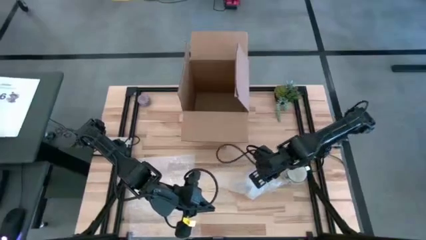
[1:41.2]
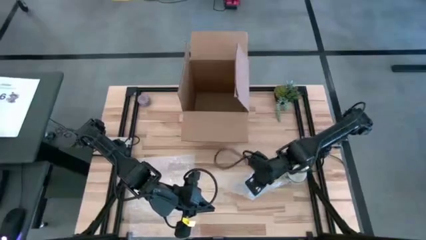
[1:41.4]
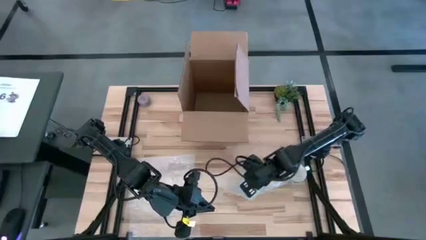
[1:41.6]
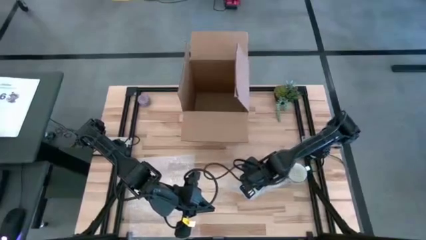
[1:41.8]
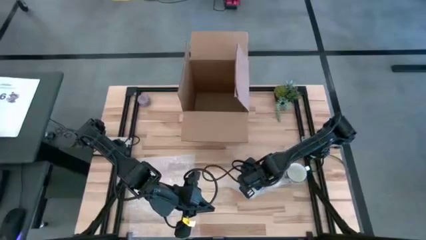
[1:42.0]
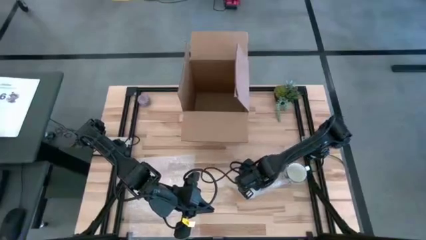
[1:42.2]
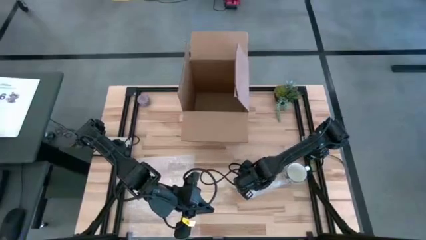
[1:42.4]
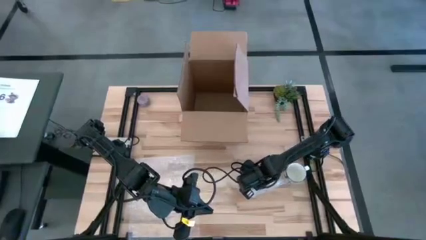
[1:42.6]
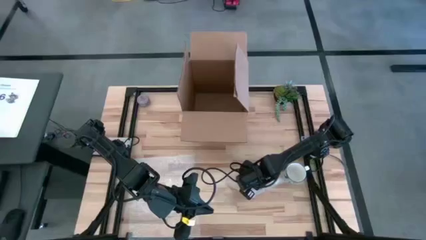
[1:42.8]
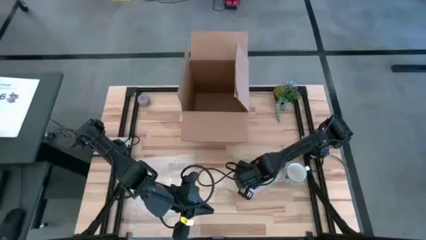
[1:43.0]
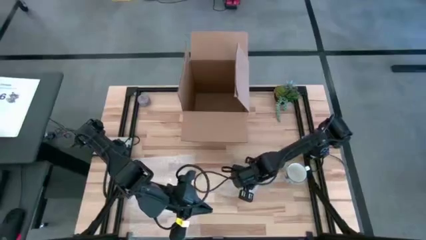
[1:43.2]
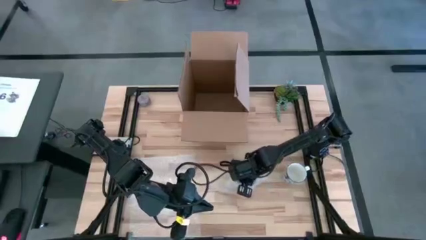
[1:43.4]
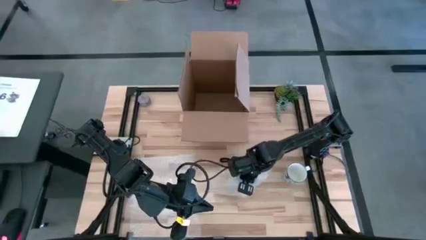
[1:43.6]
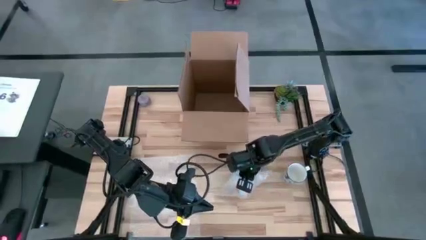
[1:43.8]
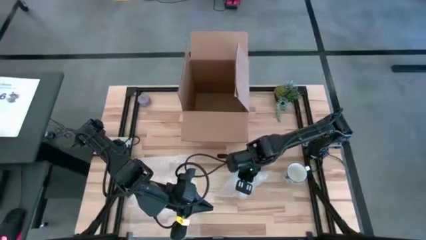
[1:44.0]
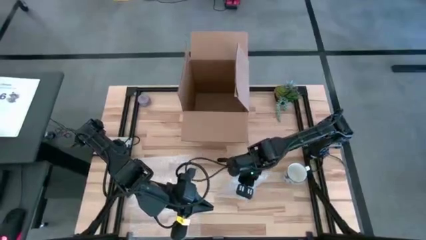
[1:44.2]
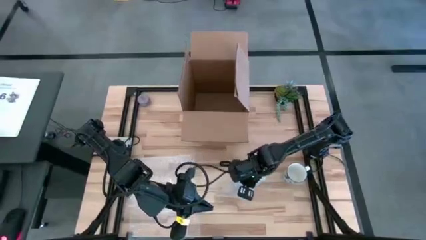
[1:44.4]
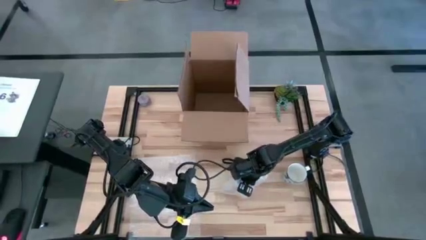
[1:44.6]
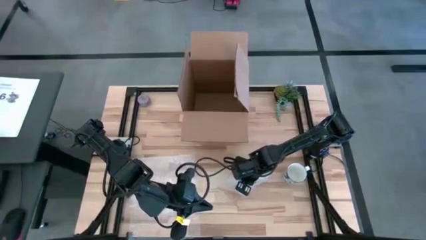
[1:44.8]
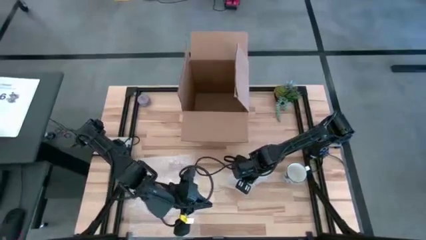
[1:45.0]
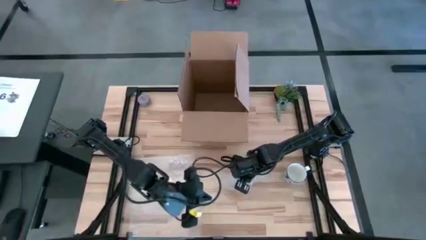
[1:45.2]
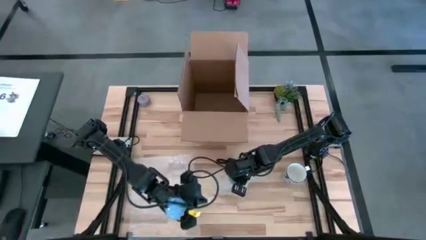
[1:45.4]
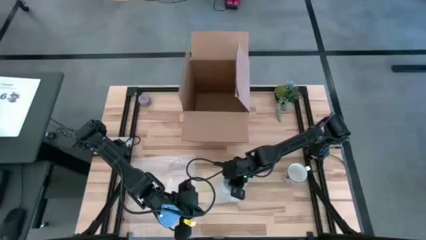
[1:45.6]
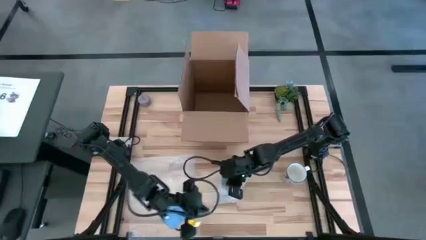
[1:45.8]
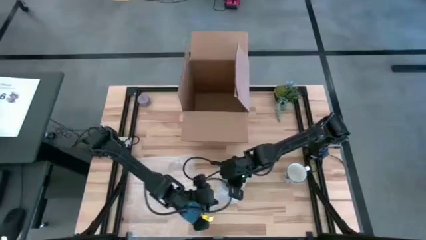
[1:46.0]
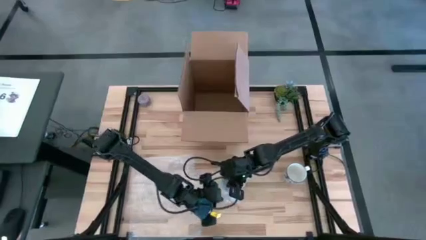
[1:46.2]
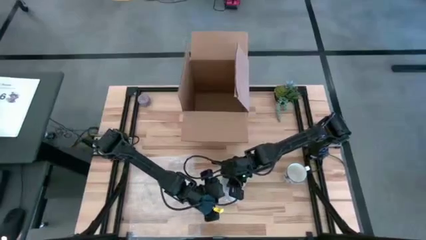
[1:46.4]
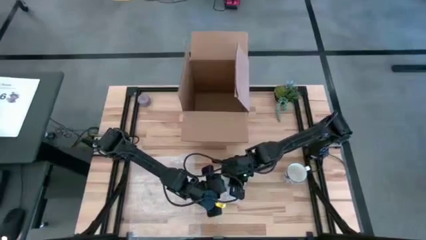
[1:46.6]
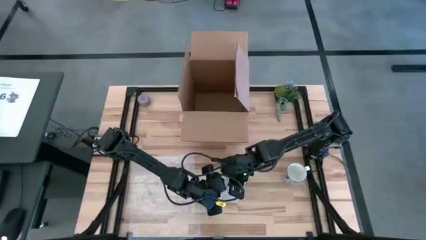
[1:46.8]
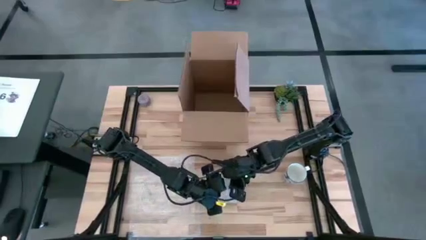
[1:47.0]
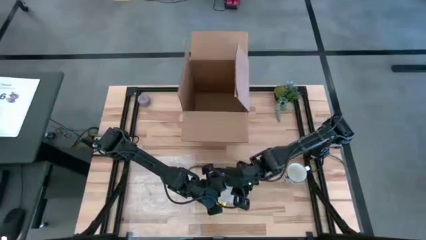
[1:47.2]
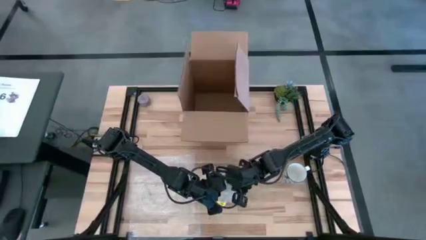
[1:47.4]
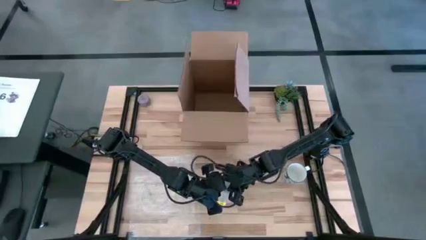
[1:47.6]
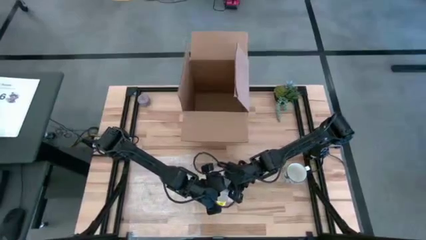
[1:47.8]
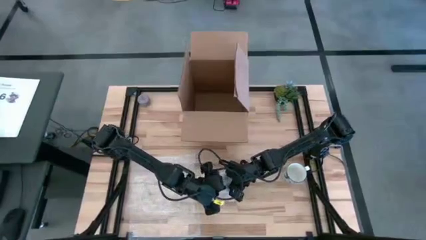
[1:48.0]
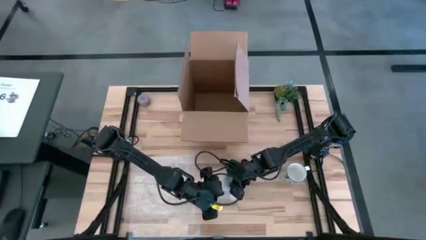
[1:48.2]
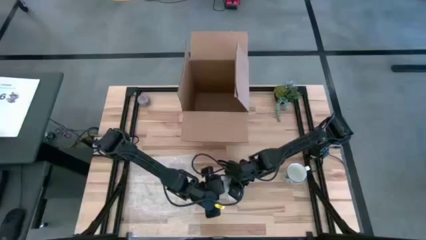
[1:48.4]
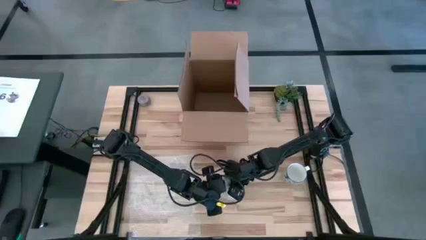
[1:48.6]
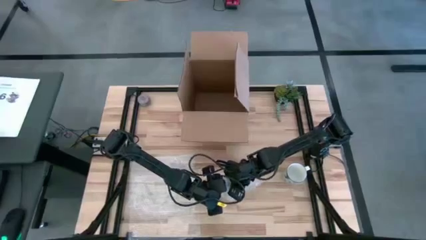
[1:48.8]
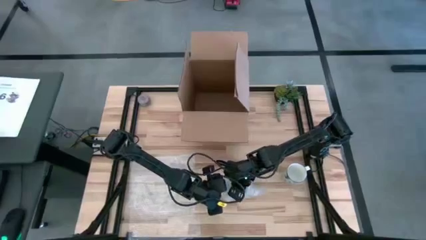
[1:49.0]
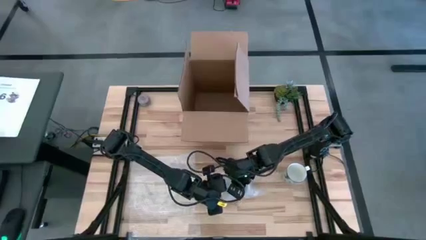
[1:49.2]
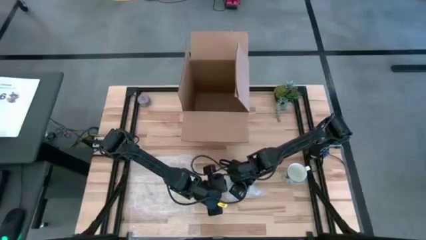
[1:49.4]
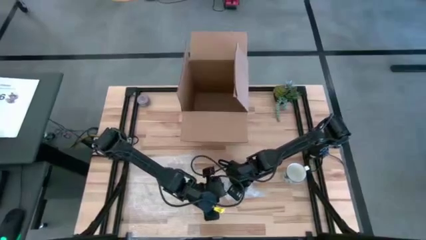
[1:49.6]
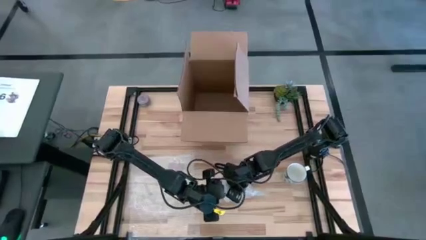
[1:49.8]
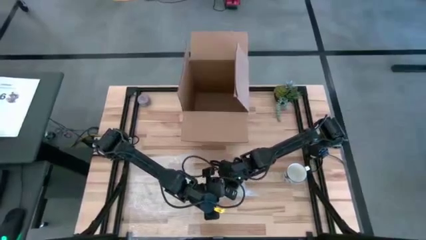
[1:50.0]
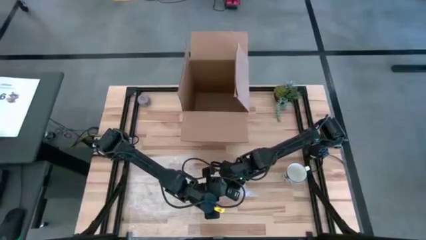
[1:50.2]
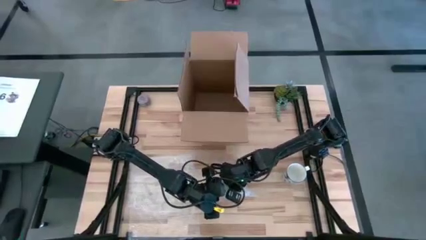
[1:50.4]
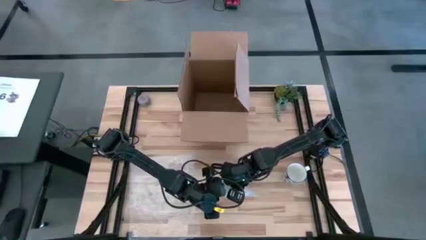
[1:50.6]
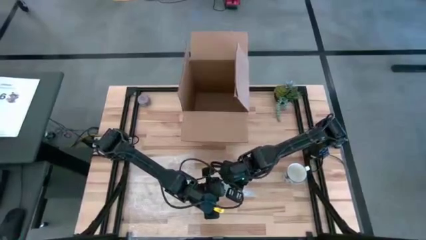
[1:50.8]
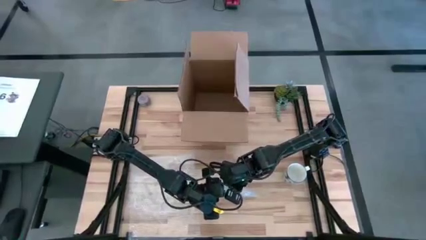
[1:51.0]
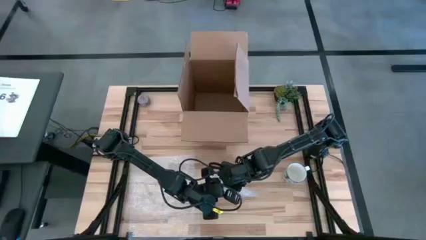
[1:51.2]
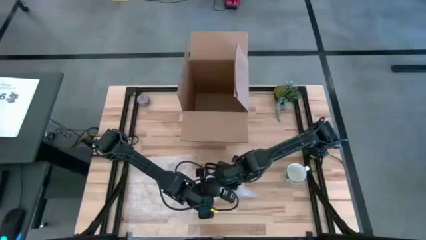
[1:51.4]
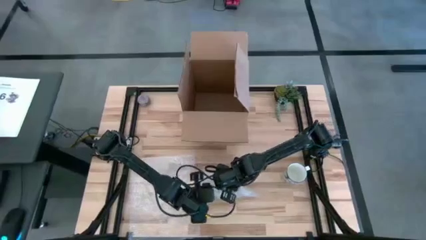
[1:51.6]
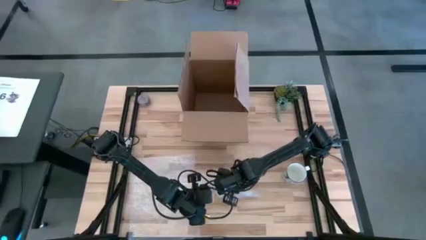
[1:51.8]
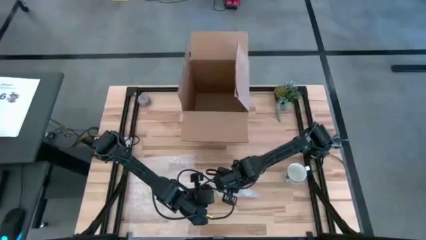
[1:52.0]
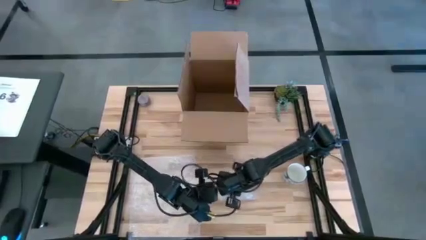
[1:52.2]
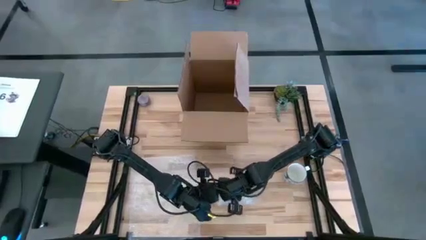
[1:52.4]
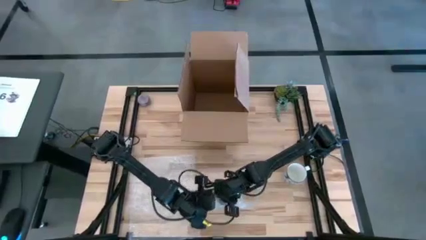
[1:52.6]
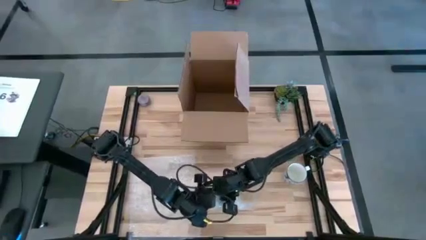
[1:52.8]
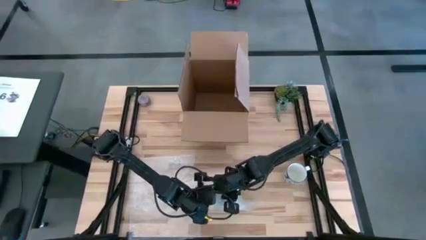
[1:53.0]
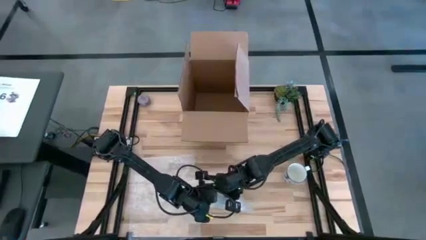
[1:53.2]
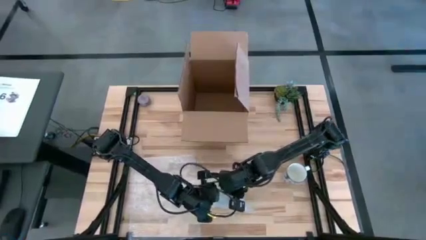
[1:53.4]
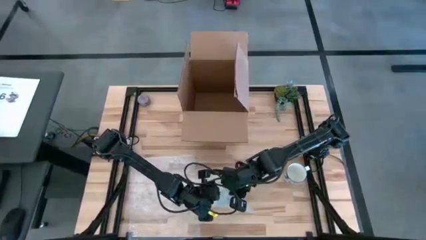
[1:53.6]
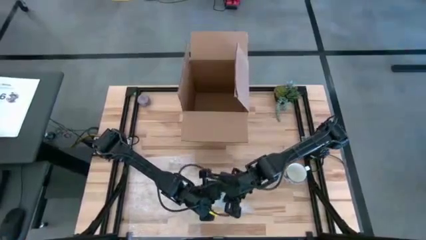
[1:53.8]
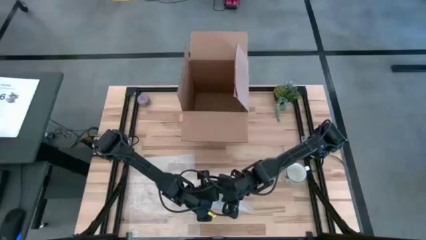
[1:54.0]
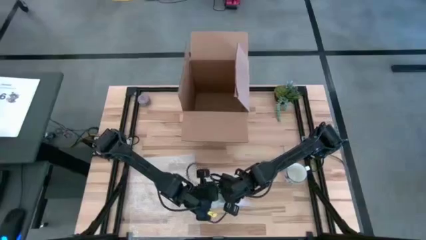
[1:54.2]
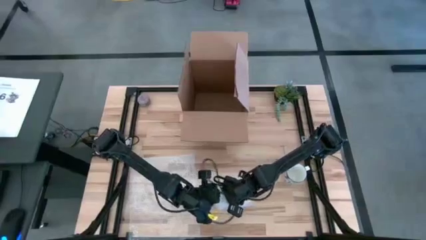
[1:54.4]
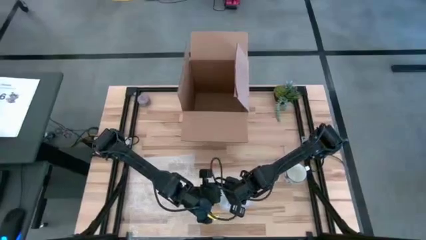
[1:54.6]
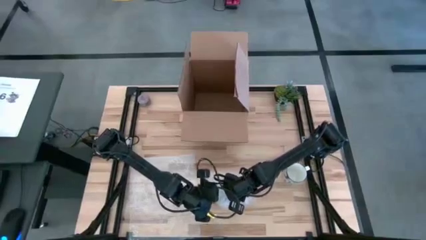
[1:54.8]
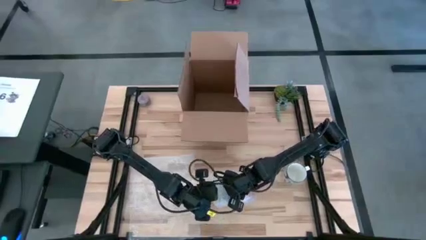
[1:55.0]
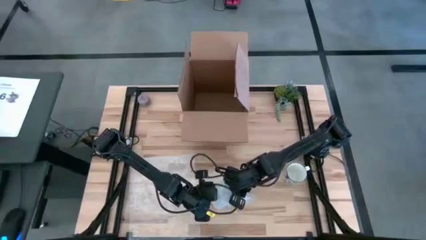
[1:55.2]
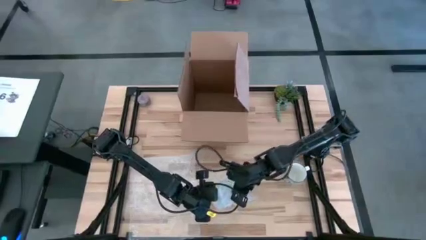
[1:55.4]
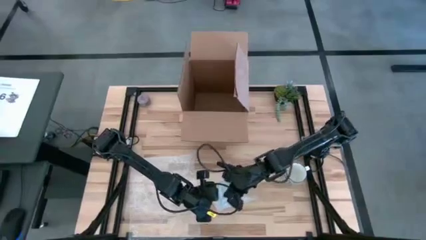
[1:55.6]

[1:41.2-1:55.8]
Task: wrap mug
Wrap the blue patterned mug with the right transparent bubble wrap

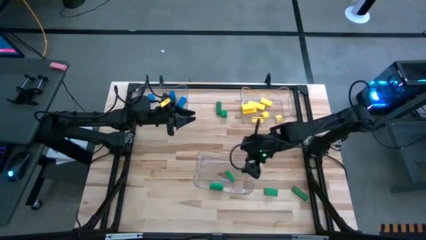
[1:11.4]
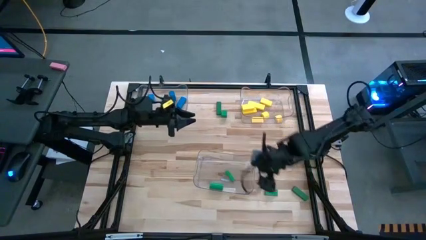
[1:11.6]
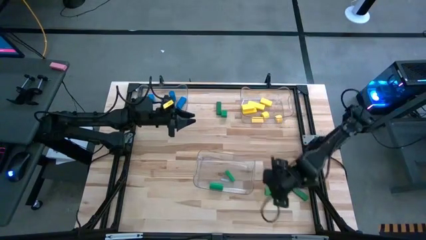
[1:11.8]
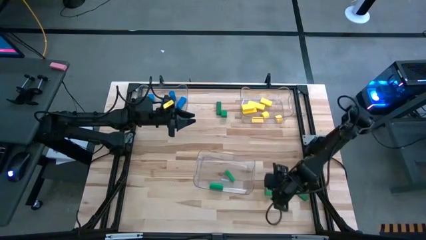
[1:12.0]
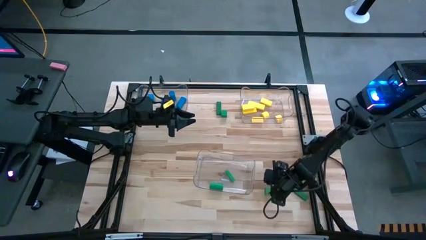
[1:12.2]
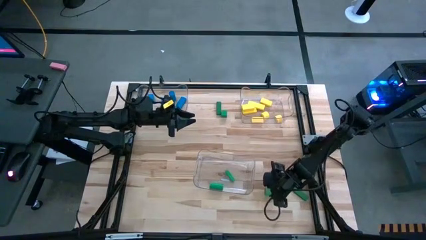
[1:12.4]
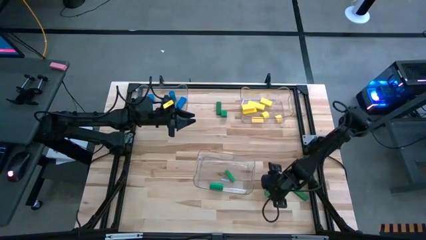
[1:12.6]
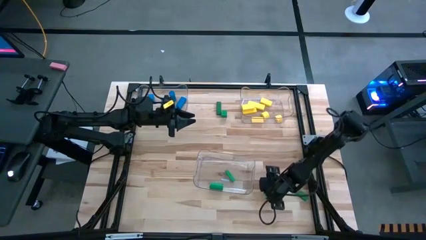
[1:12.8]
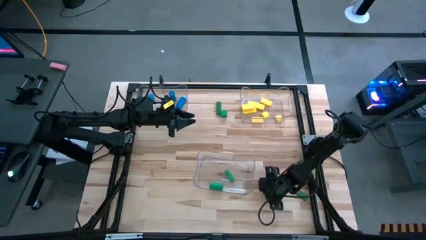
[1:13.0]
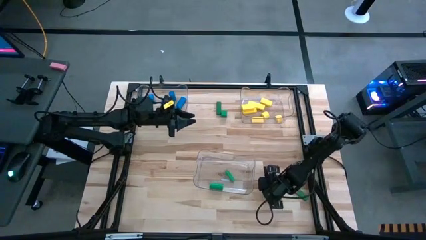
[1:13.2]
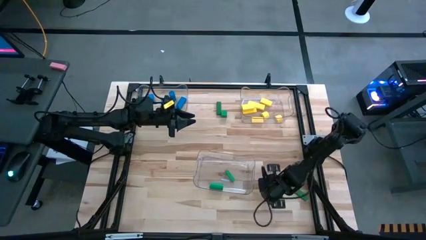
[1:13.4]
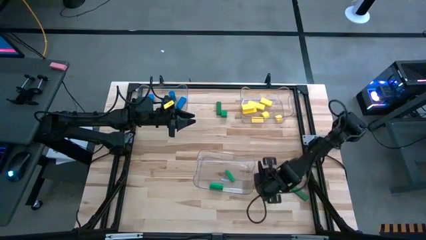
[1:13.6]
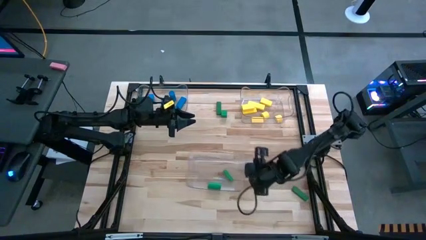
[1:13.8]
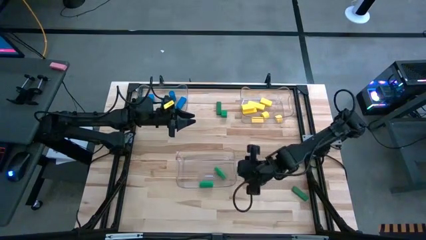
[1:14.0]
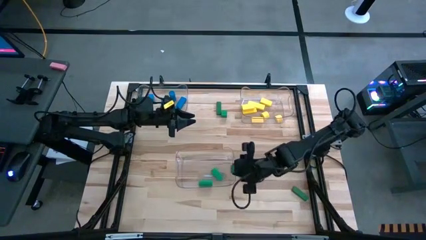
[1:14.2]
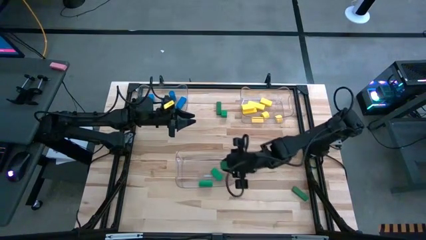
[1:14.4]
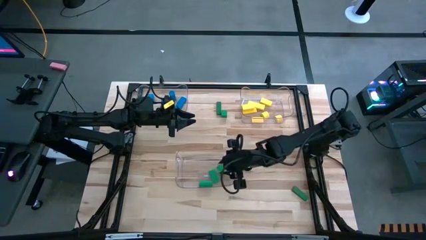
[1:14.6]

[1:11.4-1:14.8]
Task: Sort blocks
Put the green block into the bottom transparent bin
